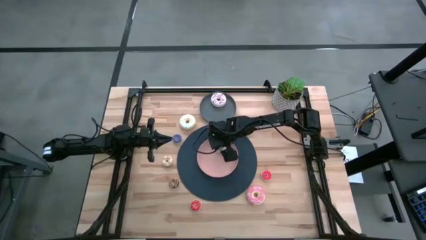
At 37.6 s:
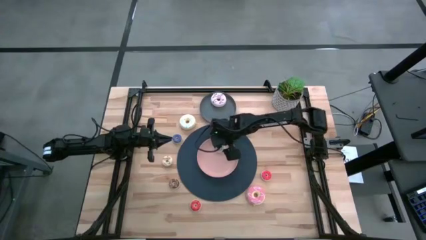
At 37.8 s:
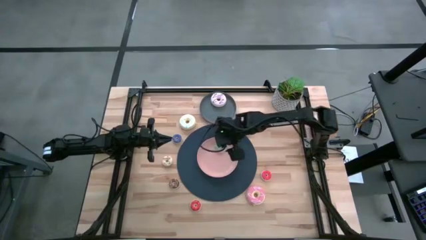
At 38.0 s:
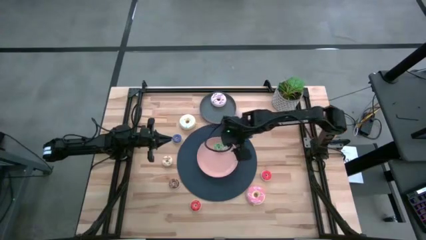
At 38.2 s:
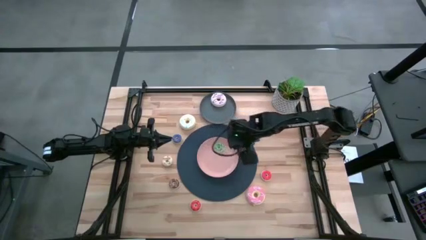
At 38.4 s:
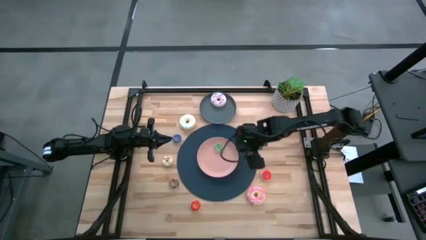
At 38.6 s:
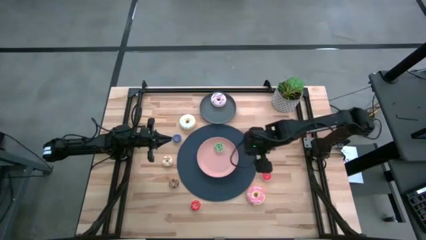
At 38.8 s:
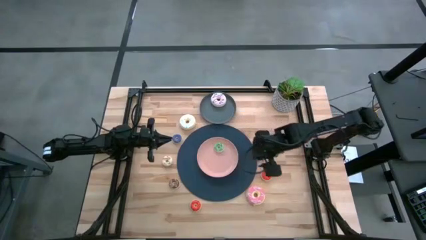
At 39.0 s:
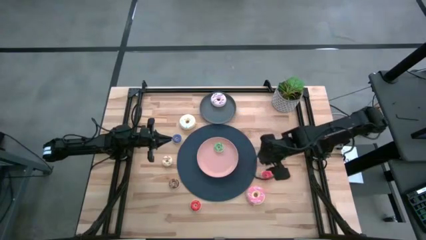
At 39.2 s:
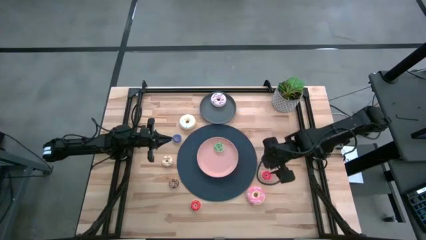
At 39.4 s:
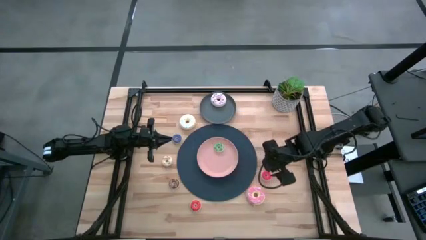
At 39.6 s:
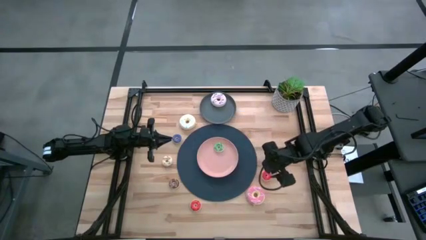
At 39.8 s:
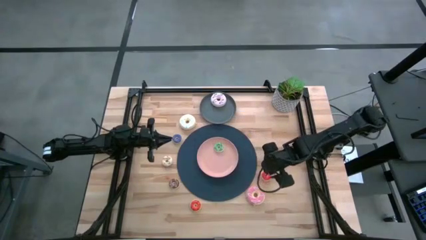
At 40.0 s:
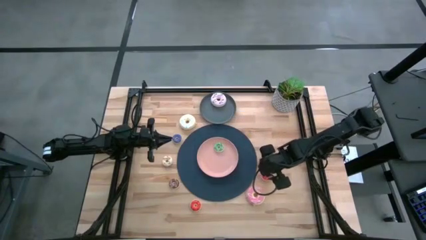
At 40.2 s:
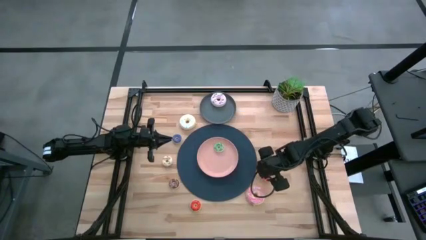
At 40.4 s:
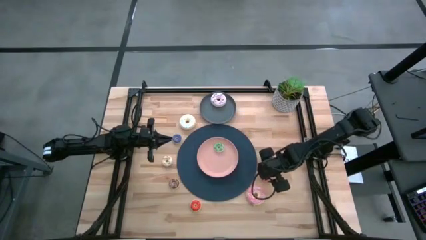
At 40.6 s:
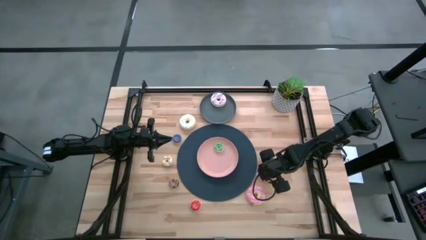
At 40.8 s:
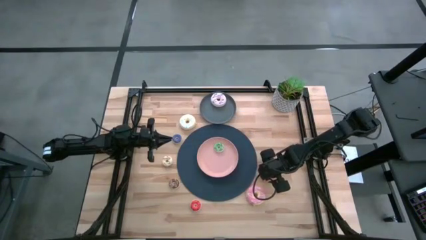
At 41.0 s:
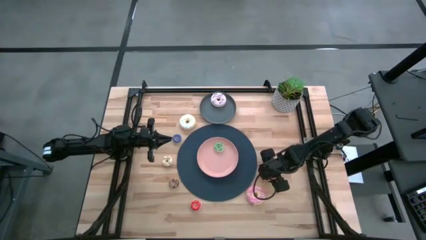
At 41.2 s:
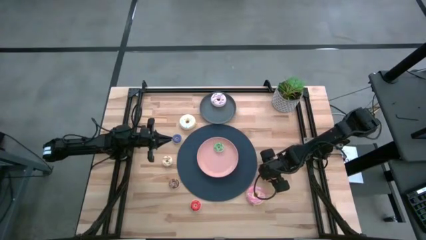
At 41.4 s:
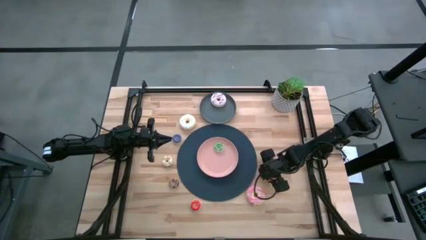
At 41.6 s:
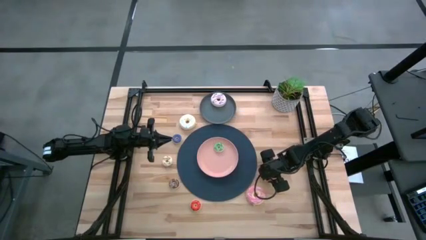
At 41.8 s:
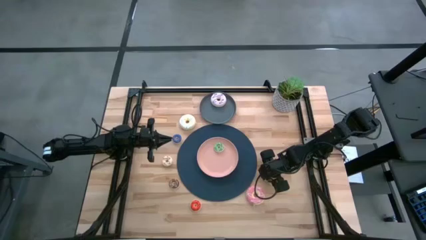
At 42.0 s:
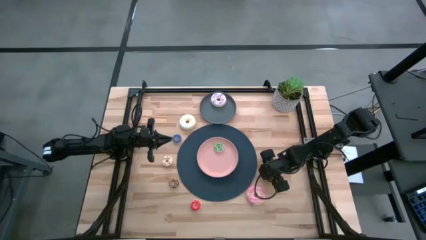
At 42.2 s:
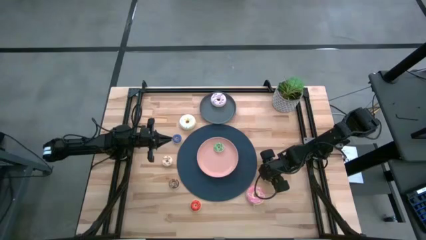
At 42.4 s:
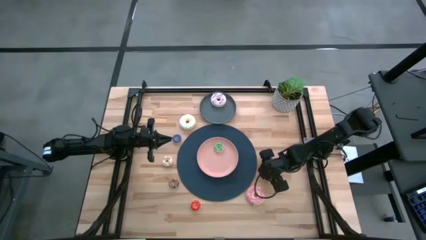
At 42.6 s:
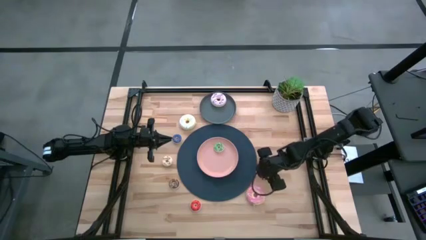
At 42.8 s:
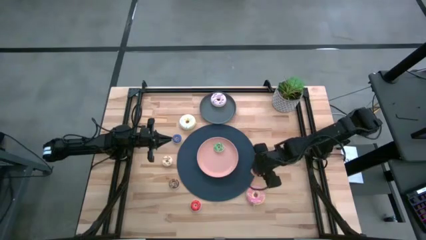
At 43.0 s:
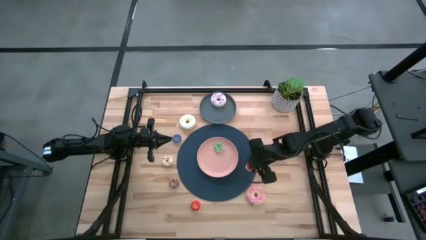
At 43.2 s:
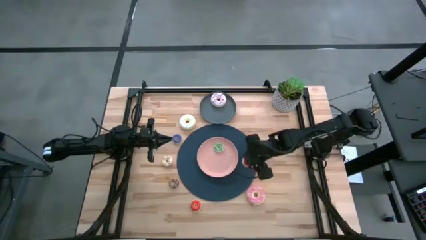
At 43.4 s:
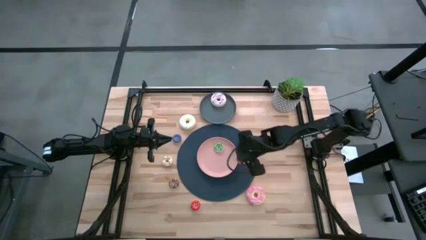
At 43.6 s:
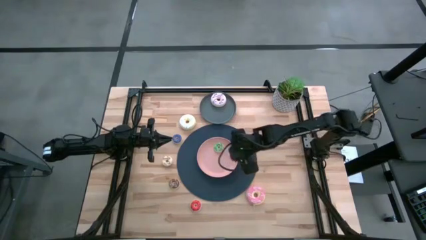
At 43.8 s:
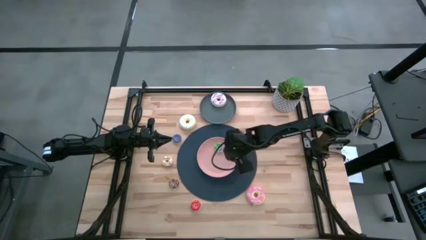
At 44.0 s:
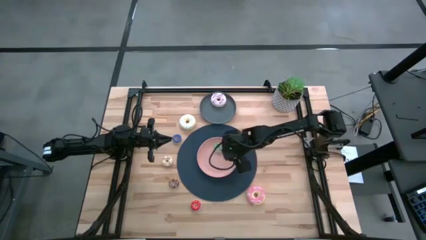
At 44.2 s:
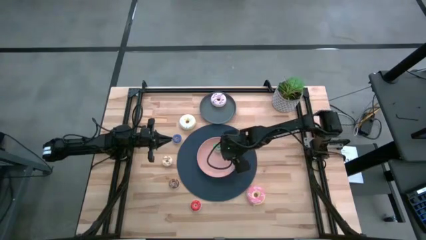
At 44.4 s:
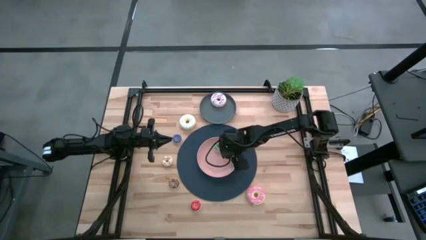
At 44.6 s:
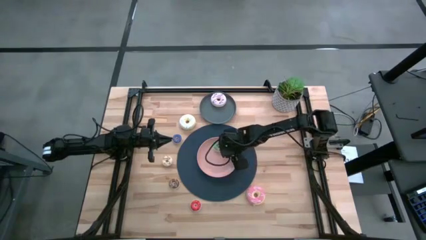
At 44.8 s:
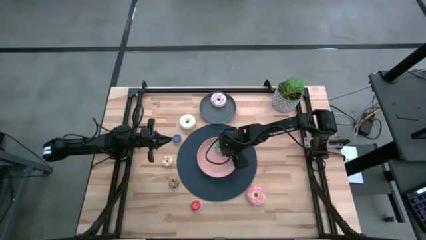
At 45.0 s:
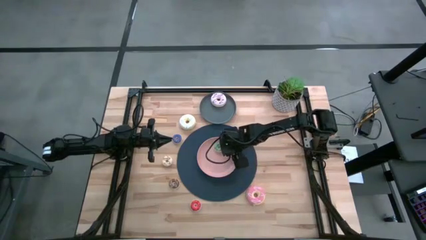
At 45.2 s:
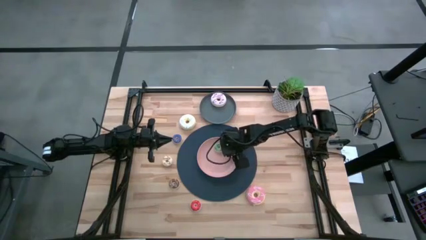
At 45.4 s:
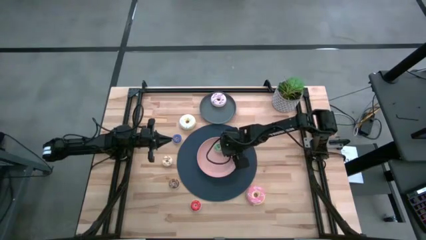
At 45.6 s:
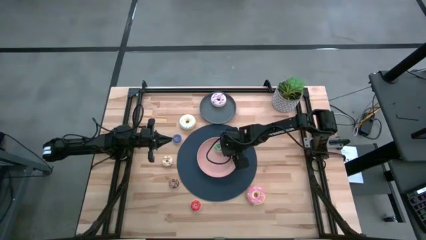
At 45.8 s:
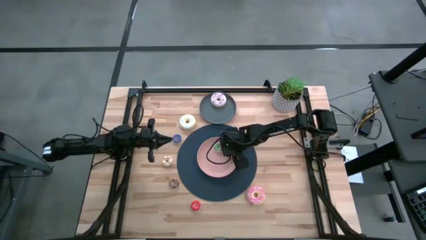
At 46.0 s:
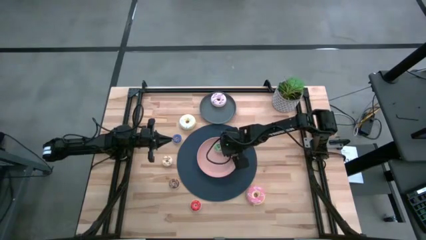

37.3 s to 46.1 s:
Task: Pick & Place donuts
Put the small red donut on the pink plate

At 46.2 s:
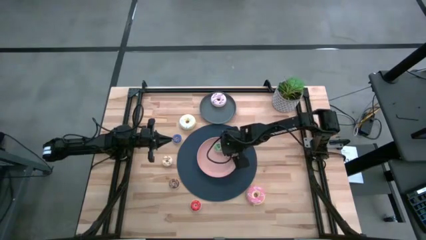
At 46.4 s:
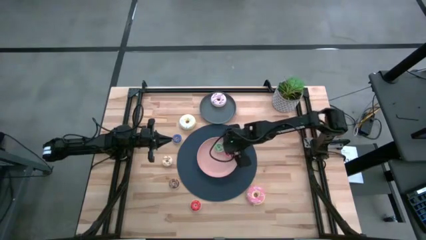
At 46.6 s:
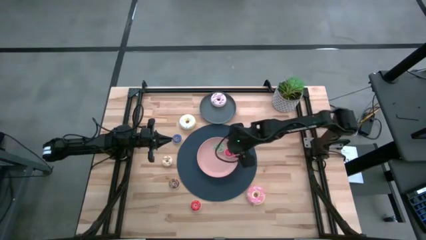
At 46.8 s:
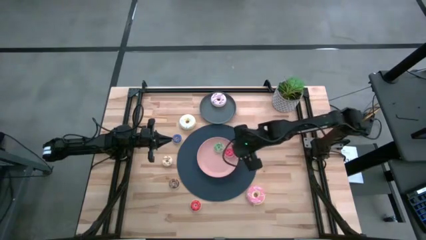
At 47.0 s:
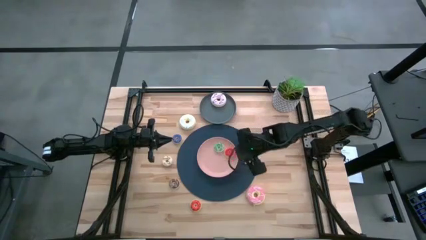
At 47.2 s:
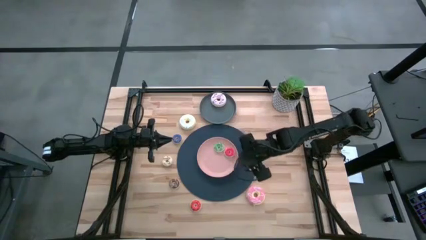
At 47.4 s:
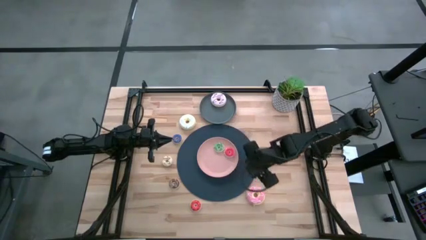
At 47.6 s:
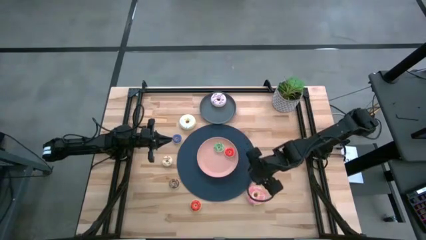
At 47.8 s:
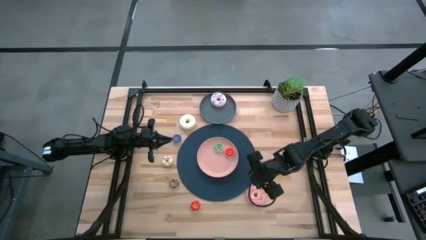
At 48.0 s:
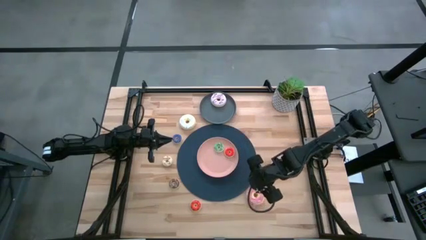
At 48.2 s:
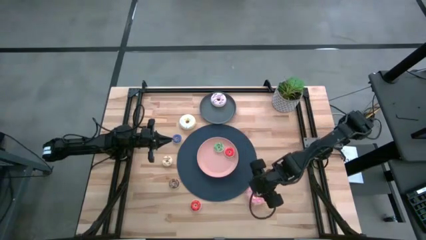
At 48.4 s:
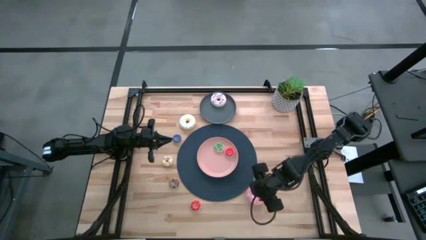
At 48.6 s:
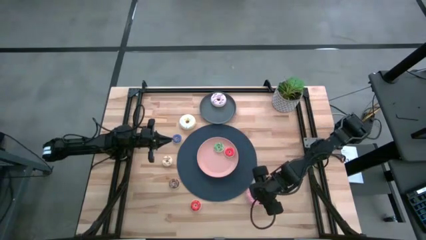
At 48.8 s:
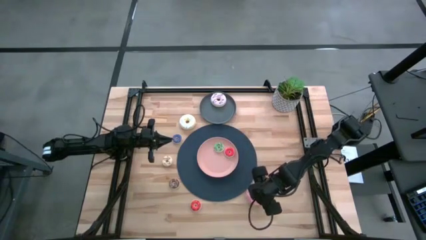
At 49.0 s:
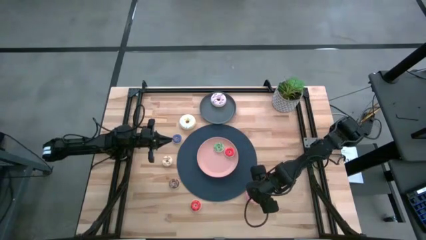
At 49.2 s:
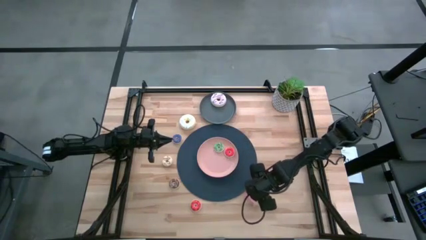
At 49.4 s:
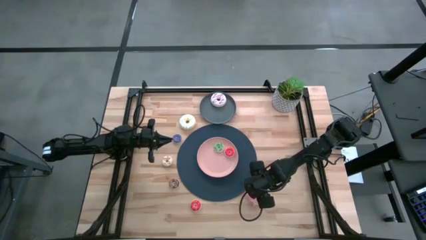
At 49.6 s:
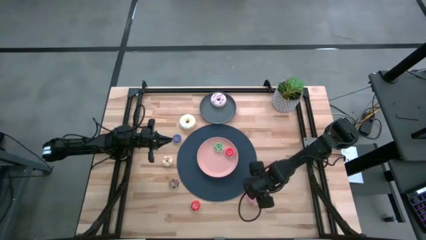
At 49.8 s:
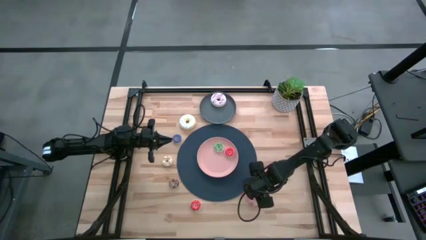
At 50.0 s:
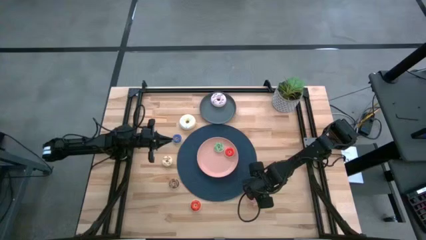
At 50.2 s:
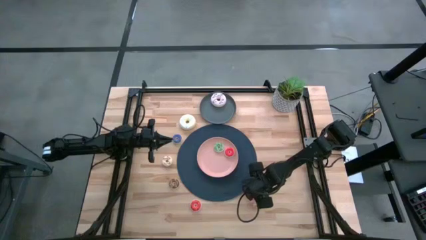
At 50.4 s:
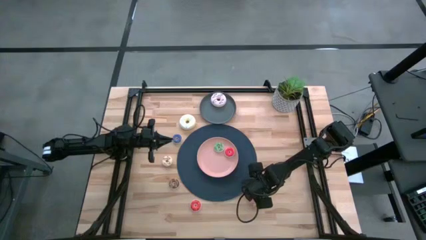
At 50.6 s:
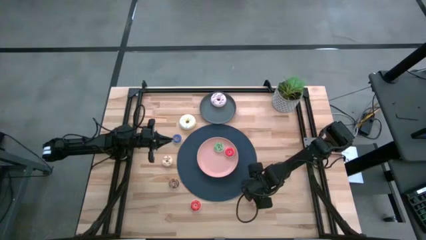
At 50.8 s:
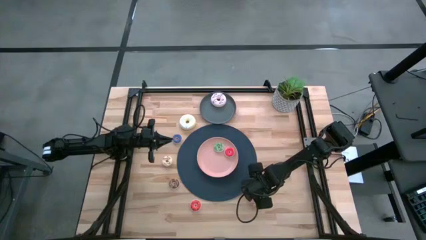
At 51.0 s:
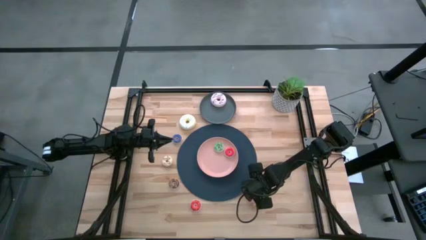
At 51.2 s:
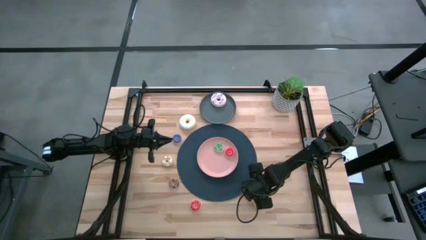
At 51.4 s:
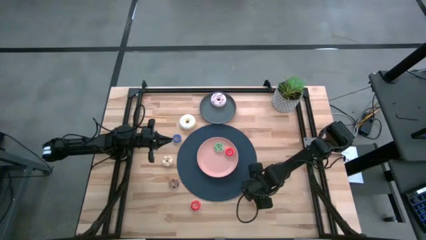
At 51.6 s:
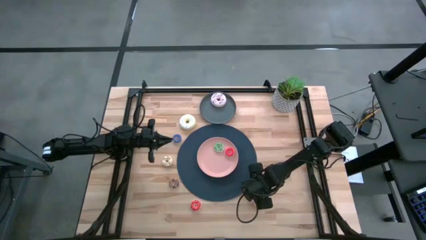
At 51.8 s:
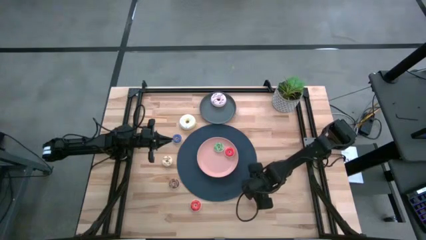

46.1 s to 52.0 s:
Put the large pink donut on the gray plate

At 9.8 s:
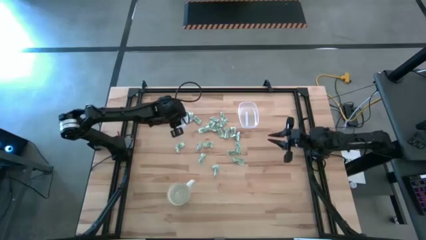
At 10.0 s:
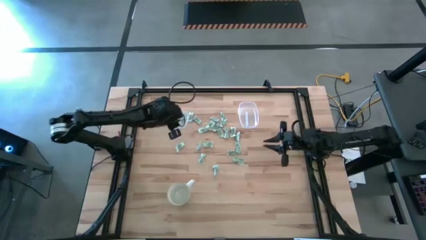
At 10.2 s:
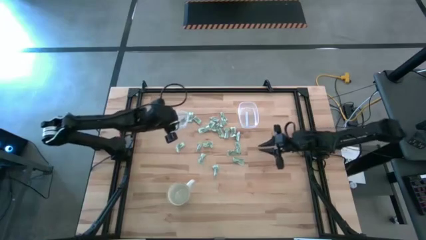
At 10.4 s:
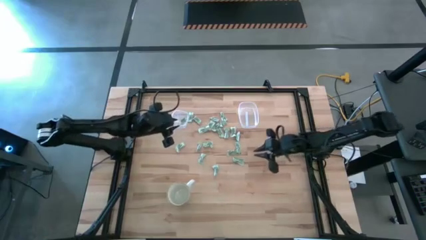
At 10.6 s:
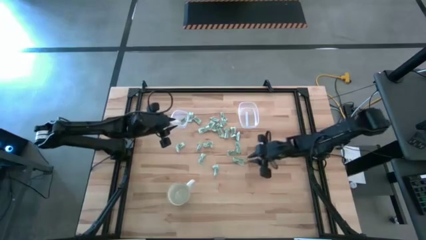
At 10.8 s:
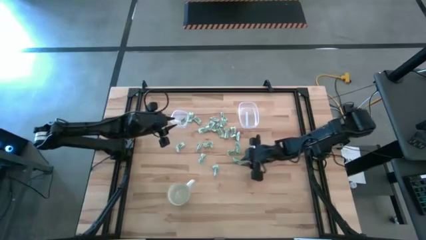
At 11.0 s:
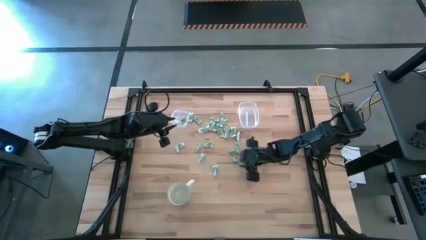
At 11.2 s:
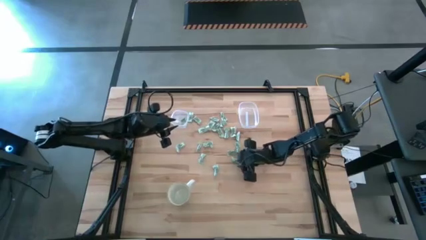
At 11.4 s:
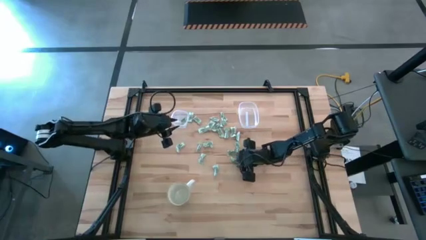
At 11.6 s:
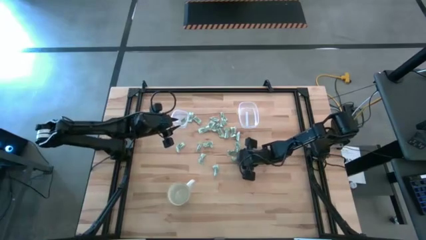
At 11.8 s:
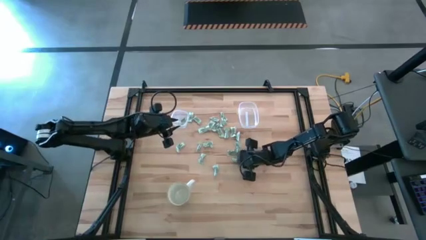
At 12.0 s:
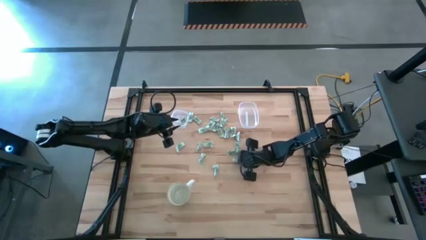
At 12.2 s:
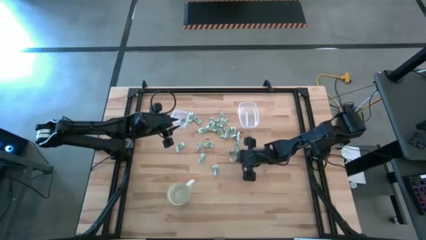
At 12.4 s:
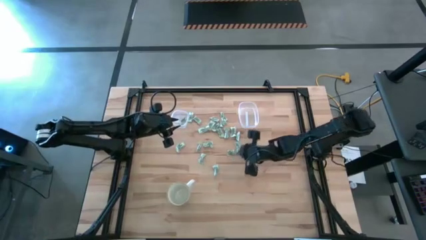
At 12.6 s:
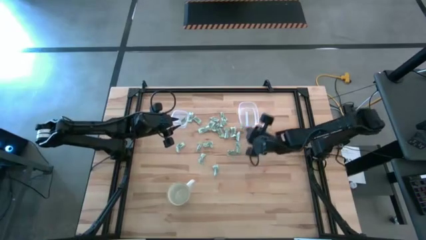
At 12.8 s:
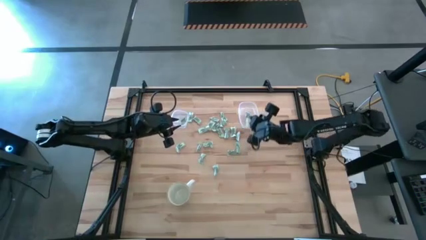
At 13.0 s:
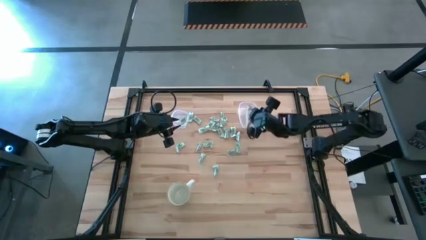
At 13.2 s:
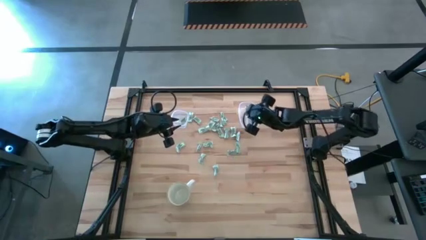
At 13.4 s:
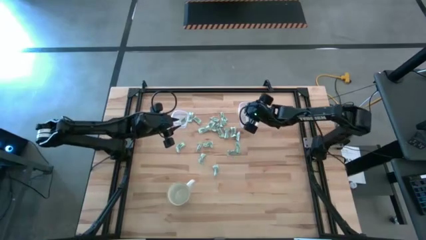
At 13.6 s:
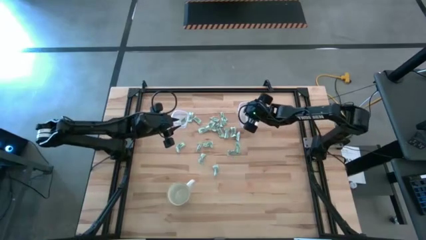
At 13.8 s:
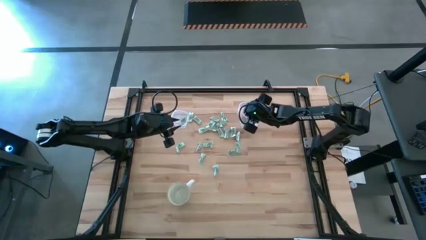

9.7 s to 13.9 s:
Task: Pick and place items into bin
Put the green stevia packet into the rectangular transparent bin
